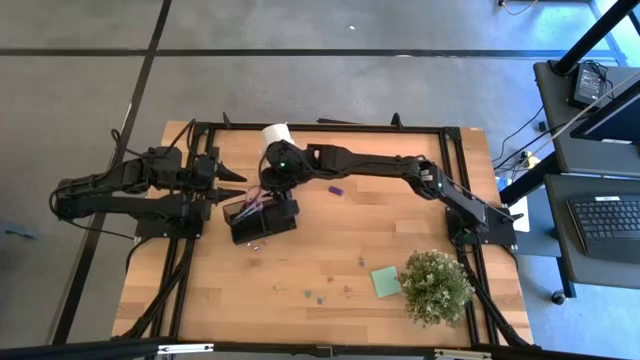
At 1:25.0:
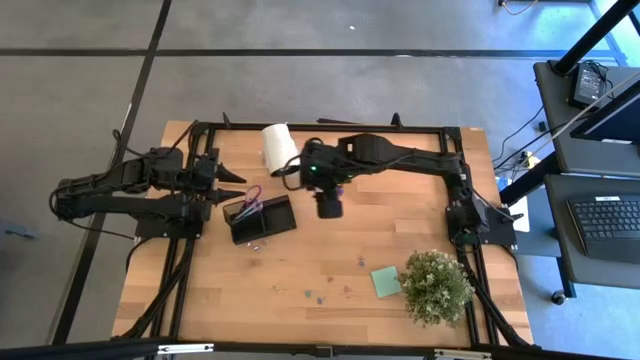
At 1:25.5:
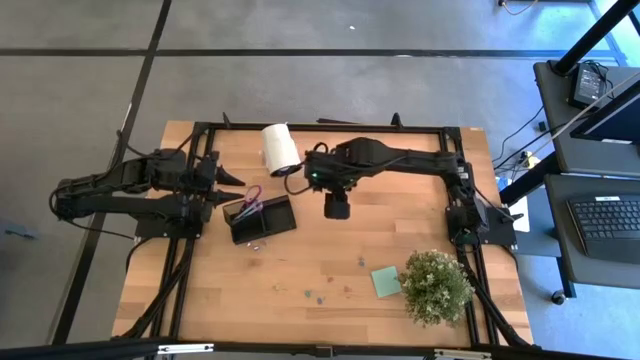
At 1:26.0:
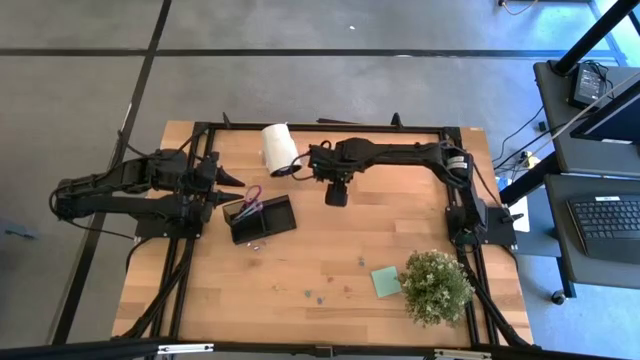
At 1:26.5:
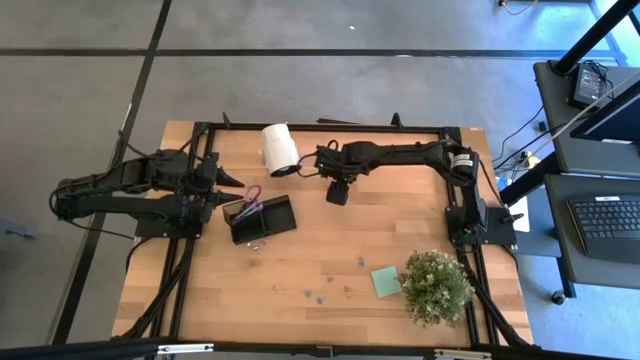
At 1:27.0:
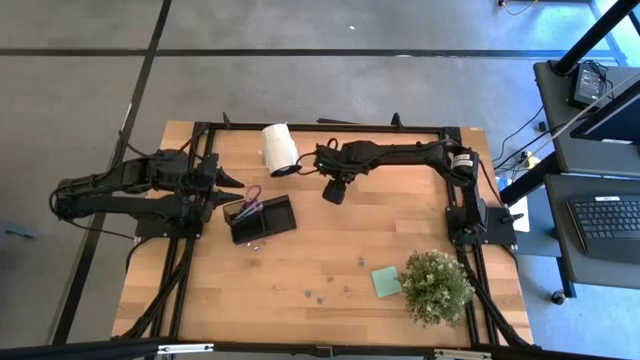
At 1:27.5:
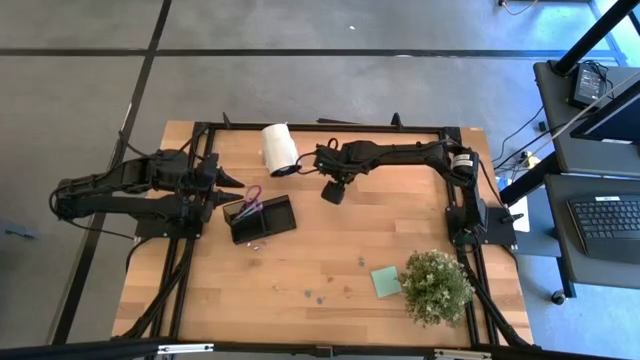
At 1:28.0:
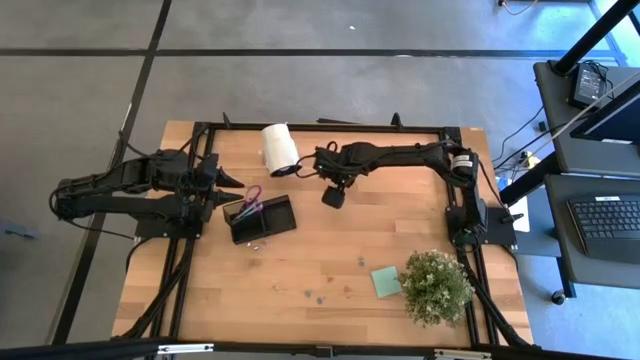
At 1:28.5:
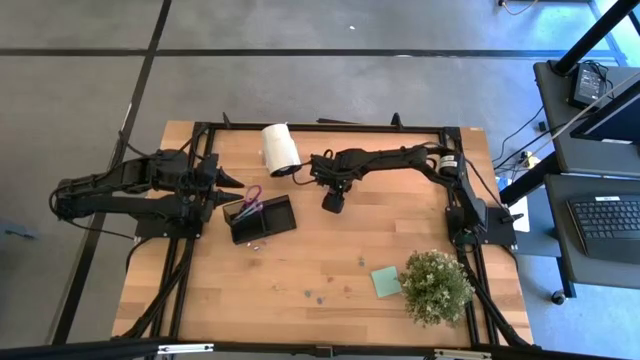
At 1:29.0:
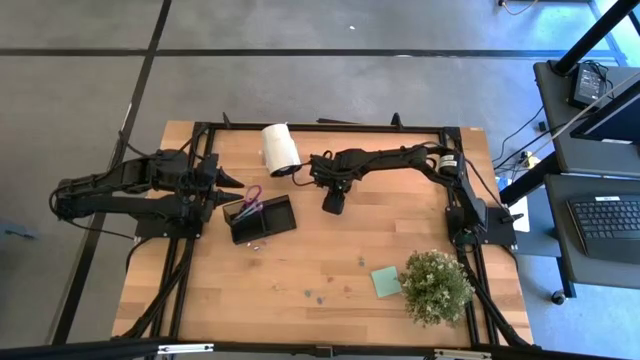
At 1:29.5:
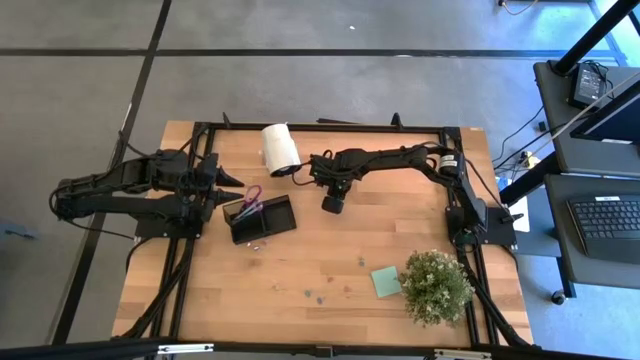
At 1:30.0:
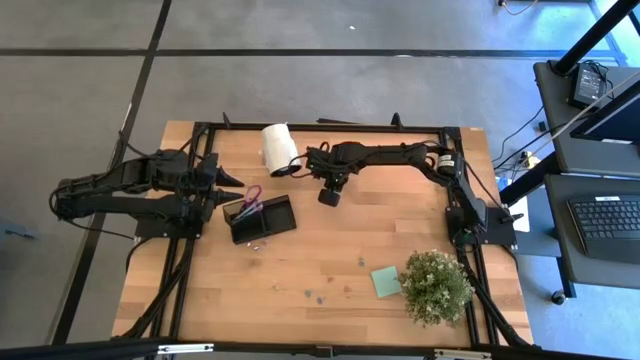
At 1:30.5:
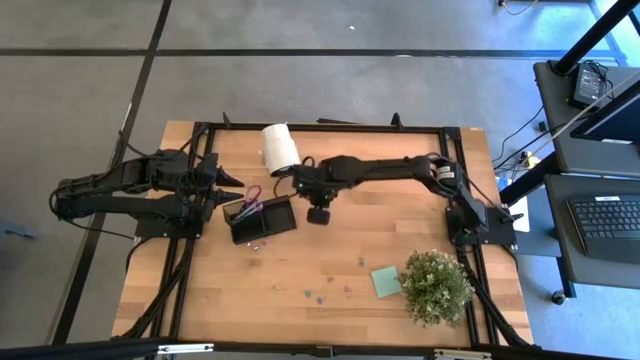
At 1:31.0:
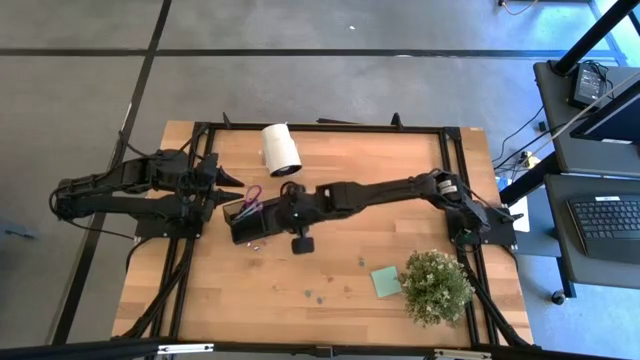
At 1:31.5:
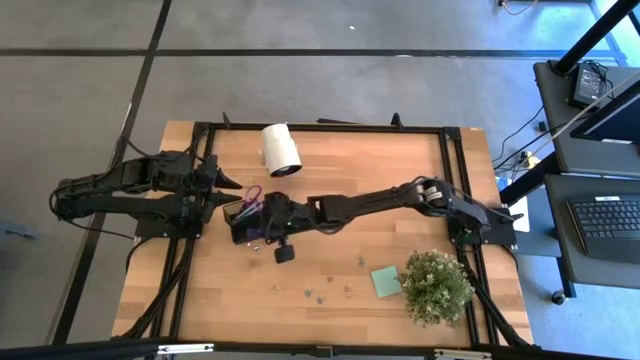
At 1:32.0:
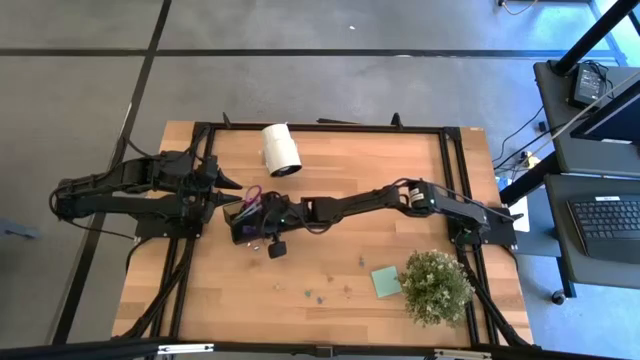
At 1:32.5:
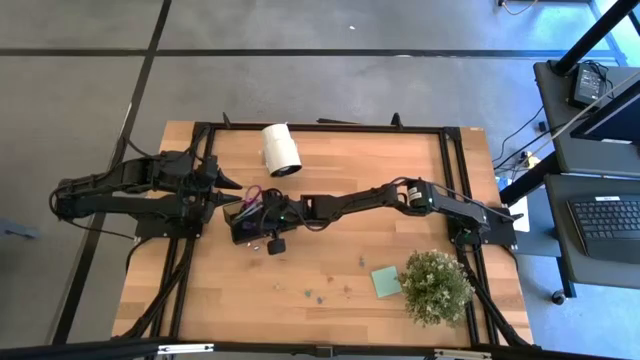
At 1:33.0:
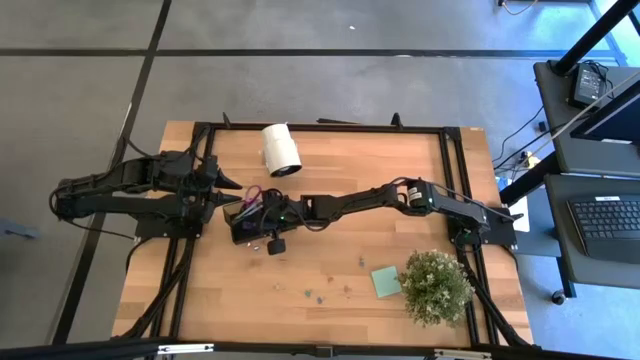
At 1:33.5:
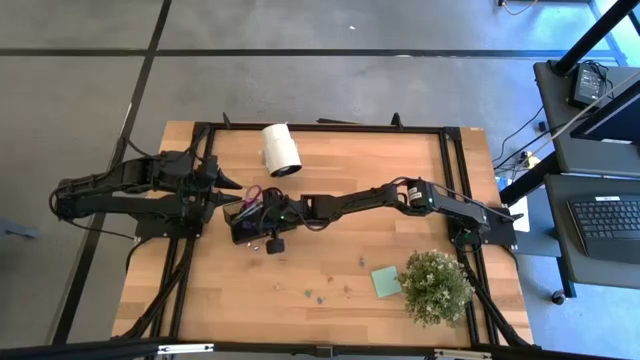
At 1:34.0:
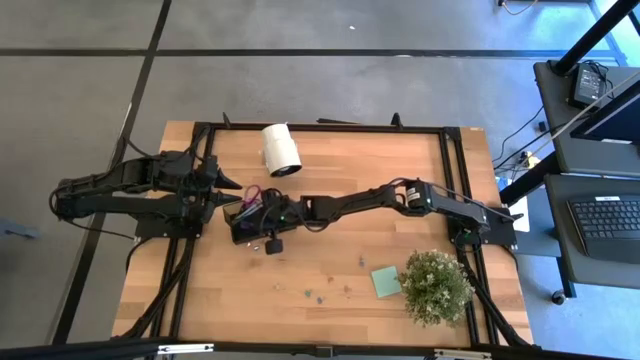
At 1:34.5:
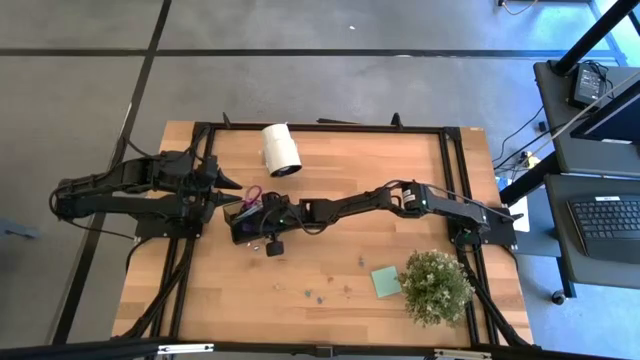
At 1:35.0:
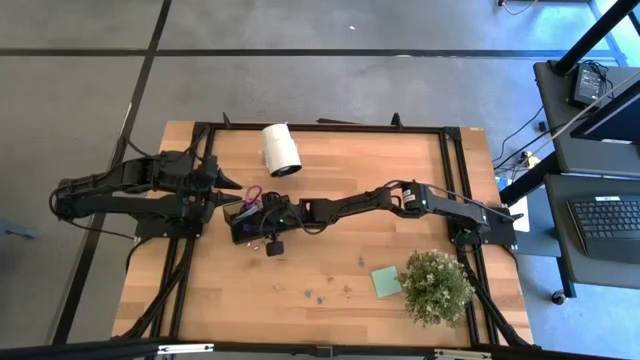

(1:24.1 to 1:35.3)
Task: Pick and place office supplies into organizer
Put the blue eraser into the black desk organizer

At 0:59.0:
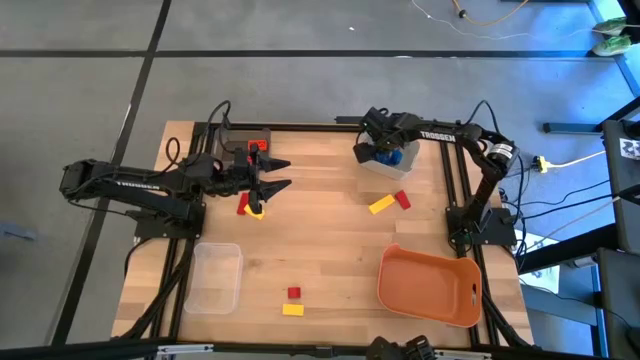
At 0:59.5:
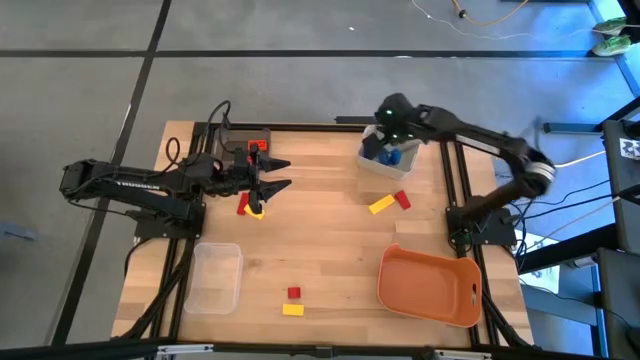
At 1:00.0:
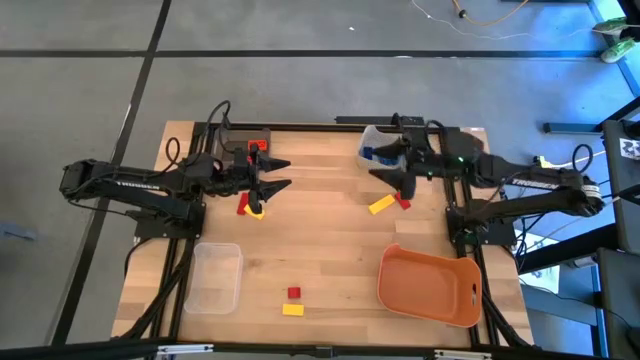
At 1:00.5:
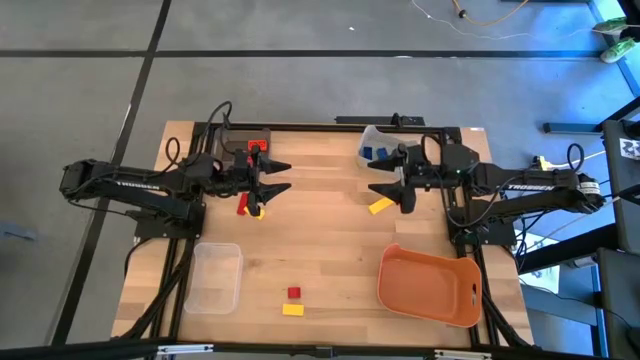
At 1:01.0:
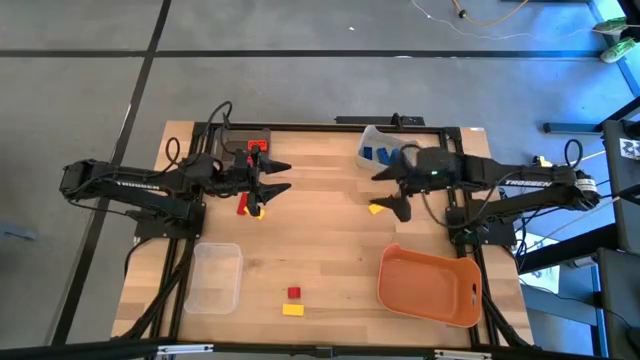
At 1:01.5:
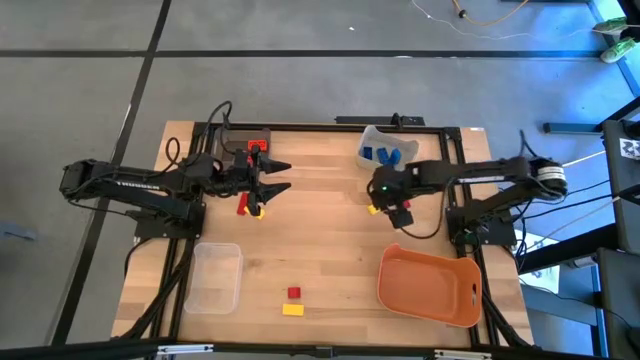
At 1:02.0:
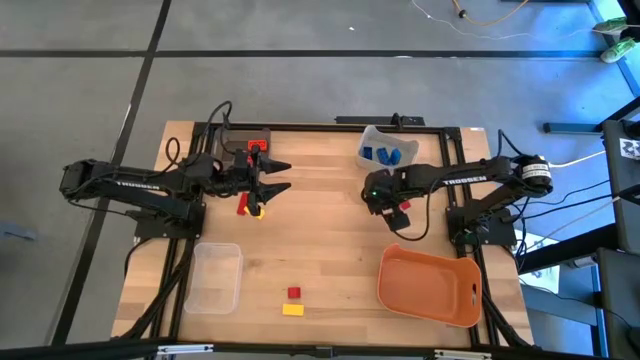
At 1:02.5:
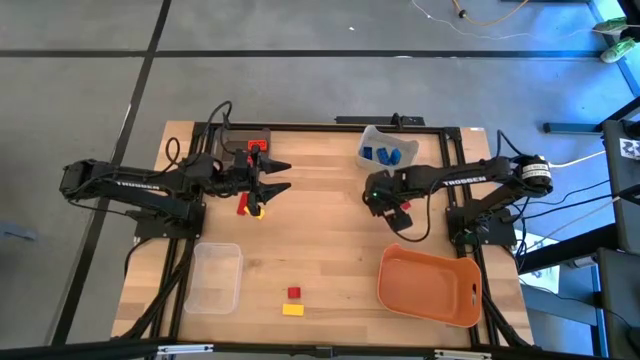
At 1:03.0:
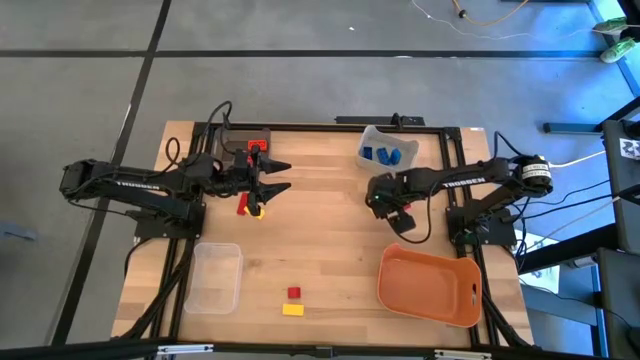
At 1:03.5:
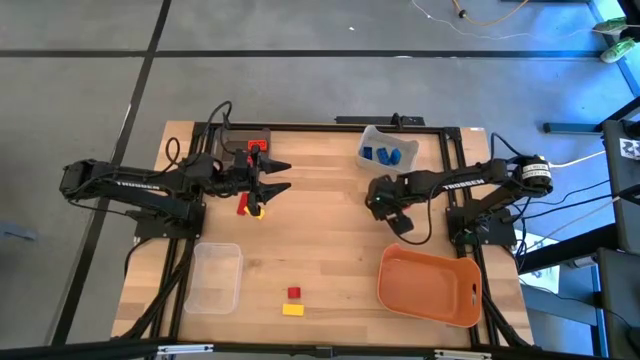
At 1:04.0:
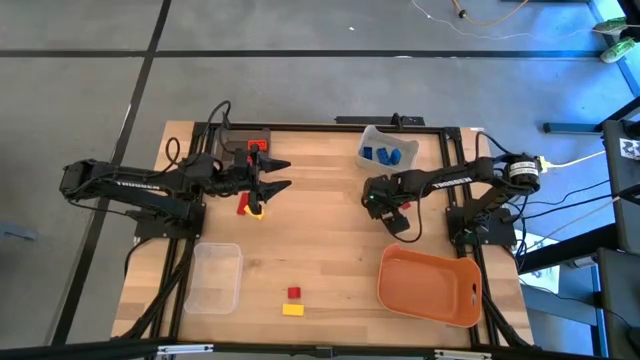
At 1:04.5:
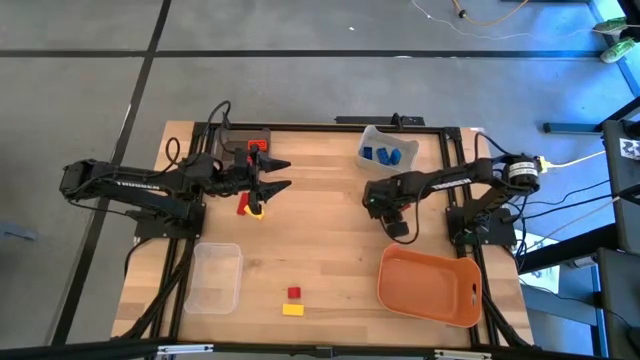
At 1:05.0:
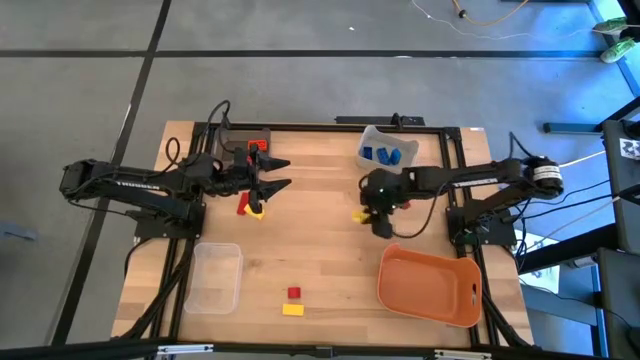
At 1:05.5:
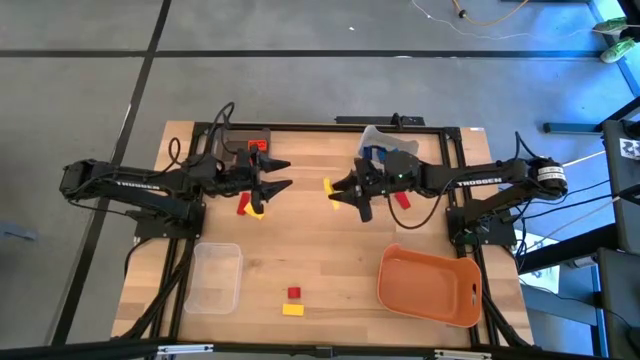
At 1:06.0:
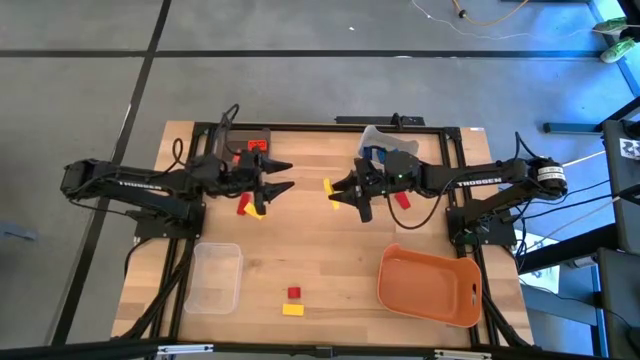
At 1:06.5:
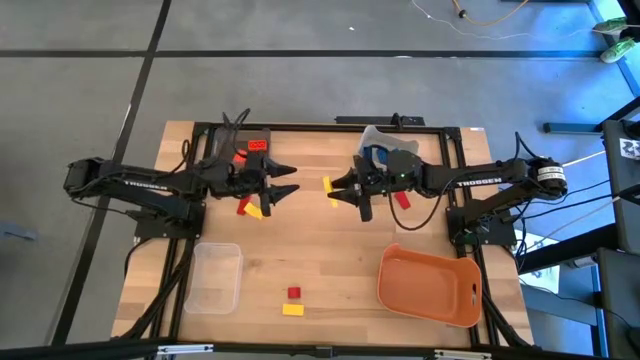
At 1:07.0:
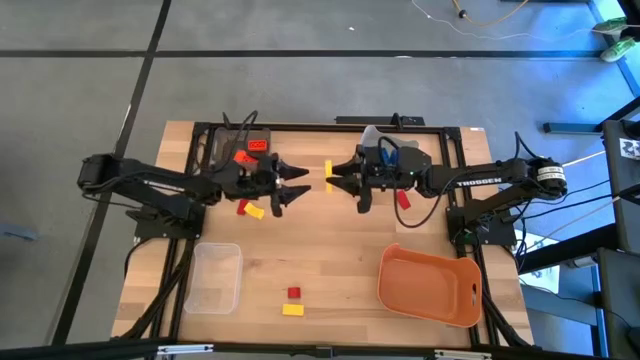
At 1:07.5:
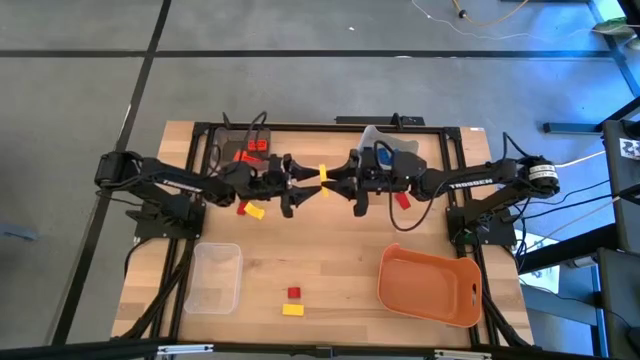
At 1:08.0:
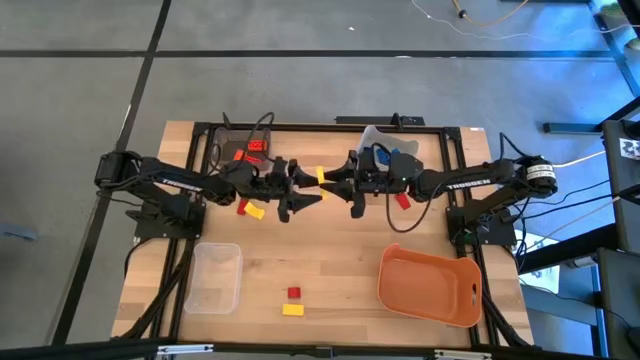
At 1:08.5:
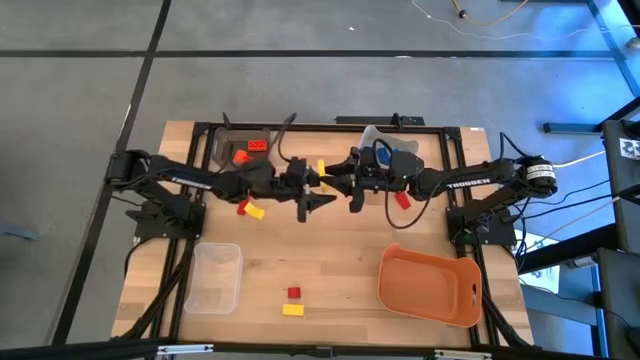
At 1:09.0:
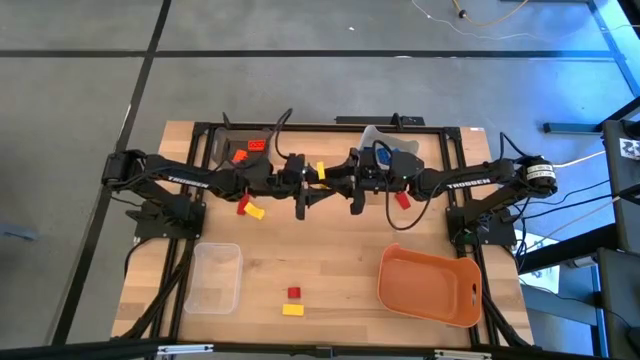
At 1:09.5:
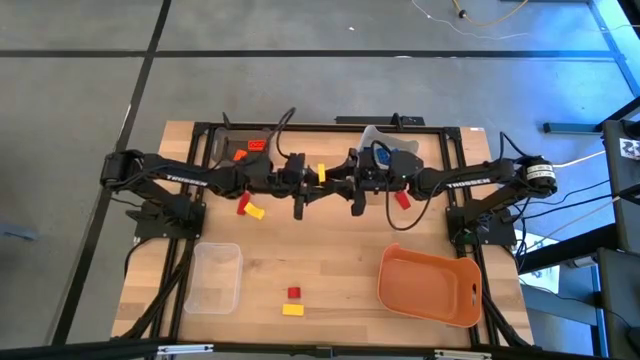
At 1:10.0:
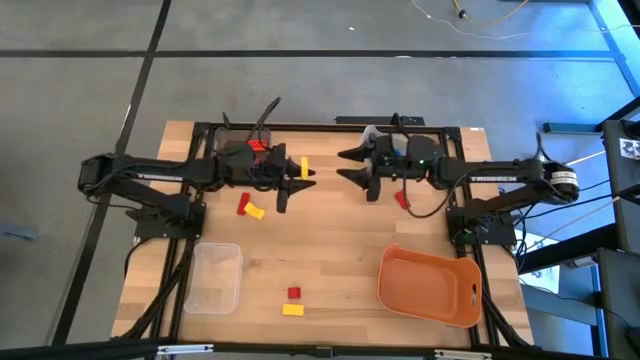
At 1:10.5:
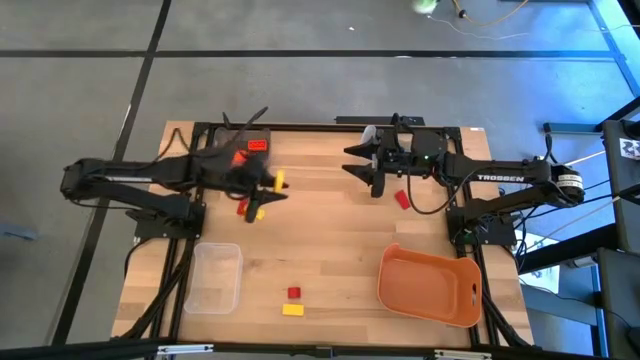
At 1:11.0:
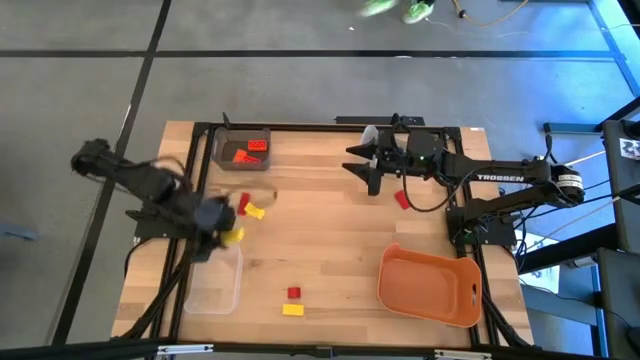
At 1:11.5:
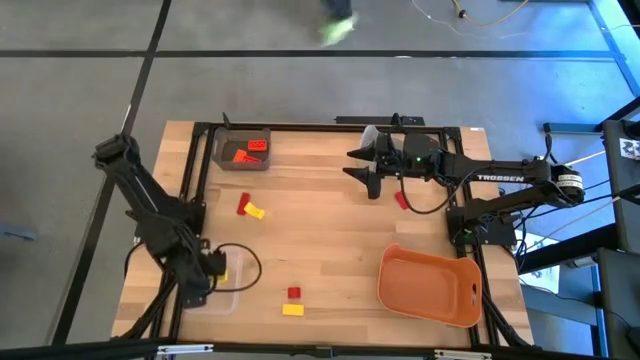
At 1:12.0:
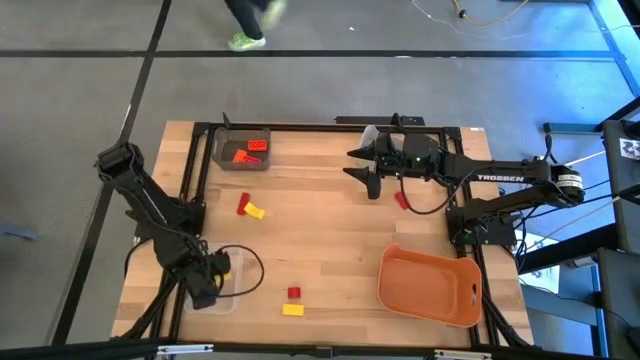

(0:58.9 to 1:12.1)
Task: Sort & place blocks by color
Put the top right yellow block into the transparent bin
